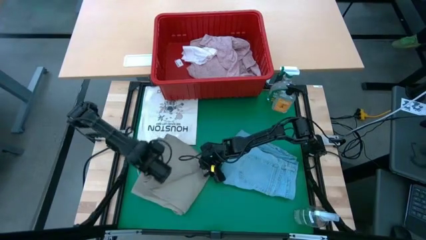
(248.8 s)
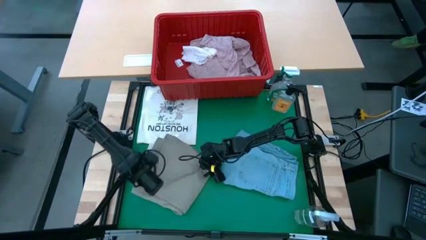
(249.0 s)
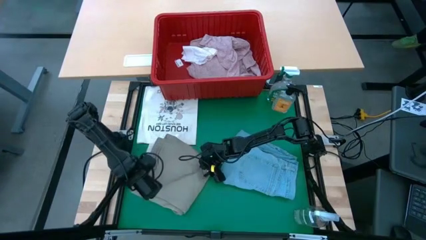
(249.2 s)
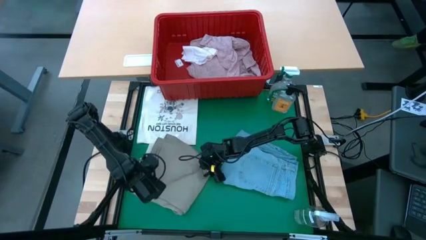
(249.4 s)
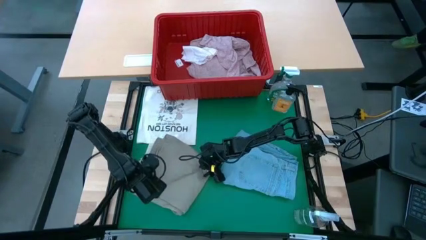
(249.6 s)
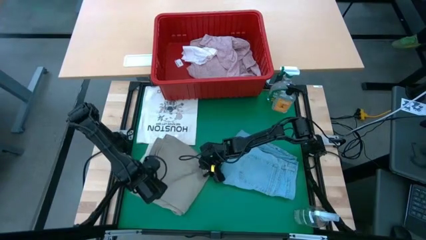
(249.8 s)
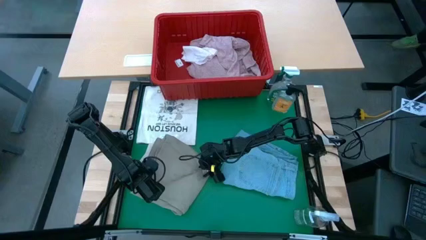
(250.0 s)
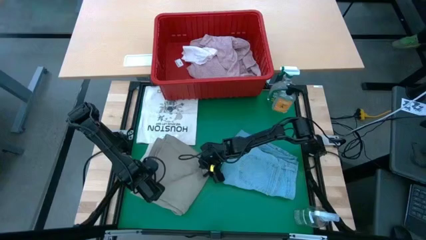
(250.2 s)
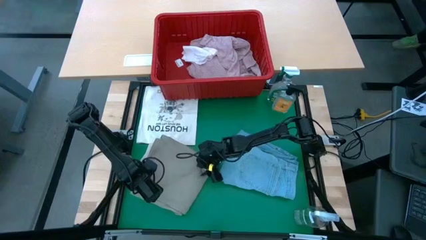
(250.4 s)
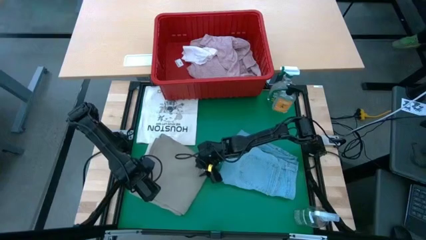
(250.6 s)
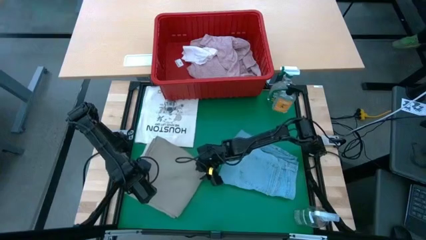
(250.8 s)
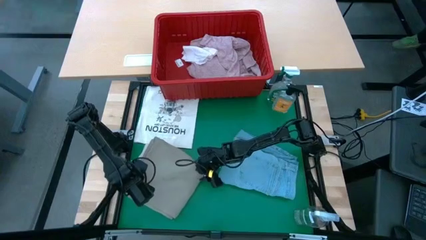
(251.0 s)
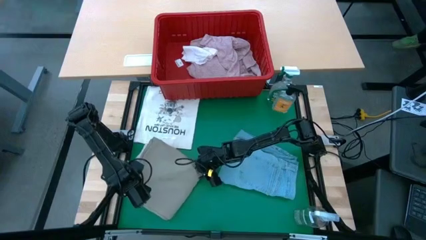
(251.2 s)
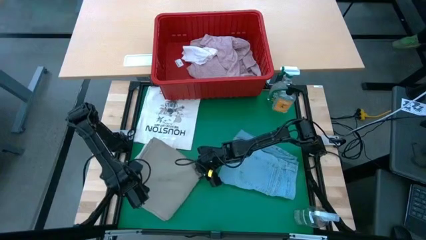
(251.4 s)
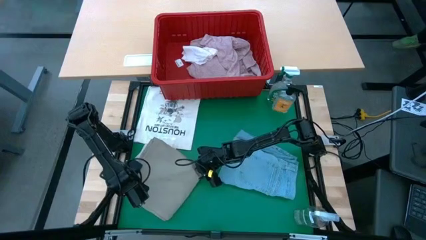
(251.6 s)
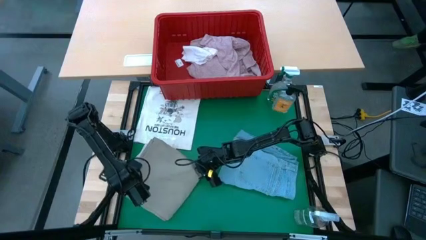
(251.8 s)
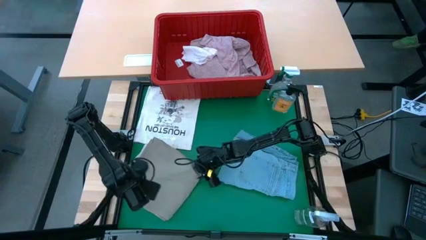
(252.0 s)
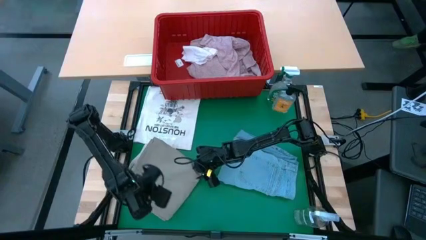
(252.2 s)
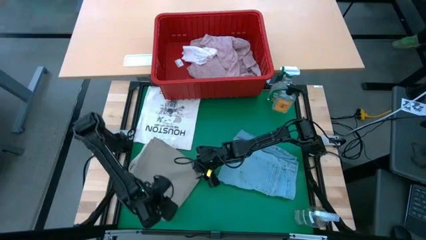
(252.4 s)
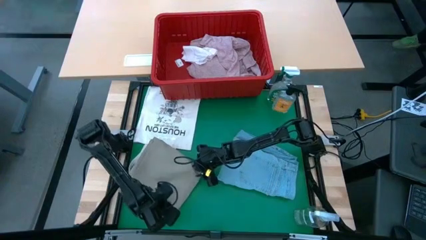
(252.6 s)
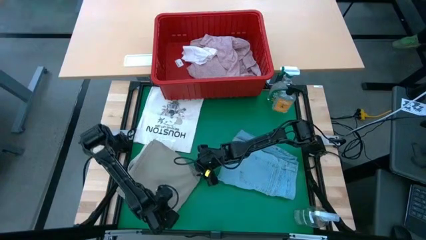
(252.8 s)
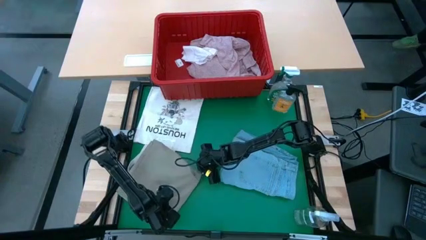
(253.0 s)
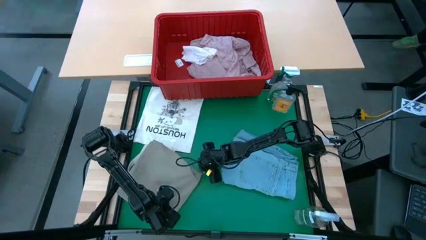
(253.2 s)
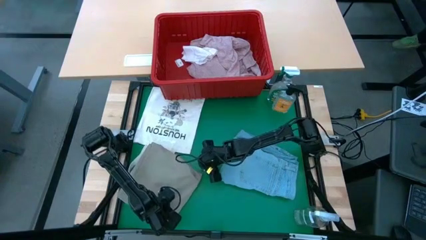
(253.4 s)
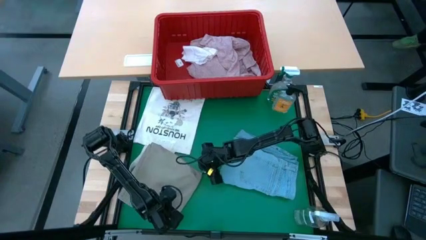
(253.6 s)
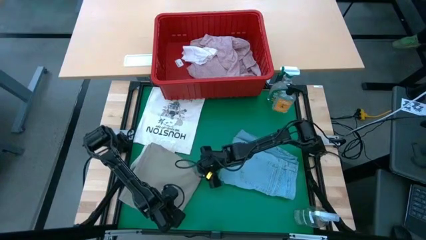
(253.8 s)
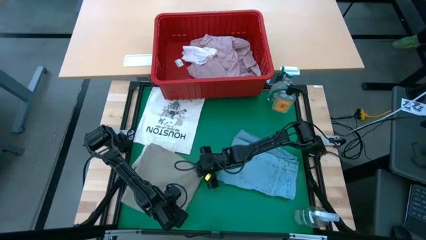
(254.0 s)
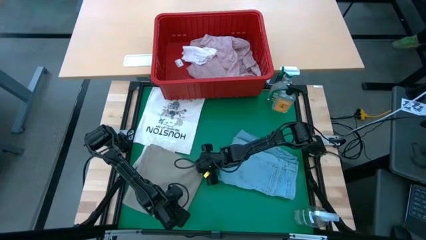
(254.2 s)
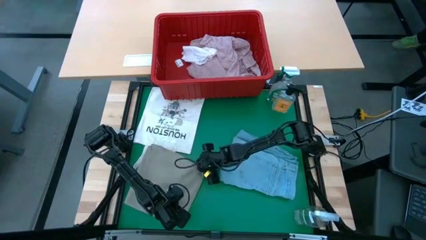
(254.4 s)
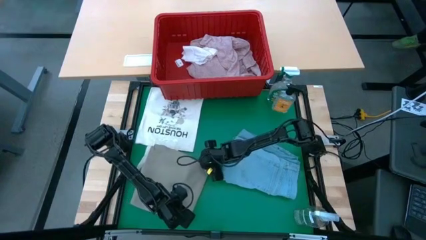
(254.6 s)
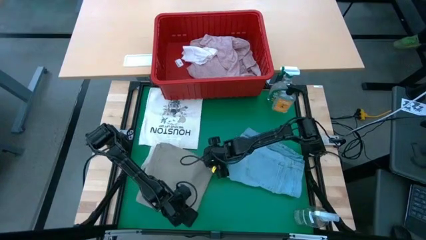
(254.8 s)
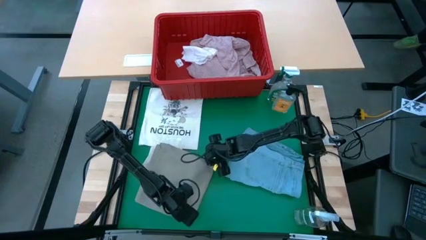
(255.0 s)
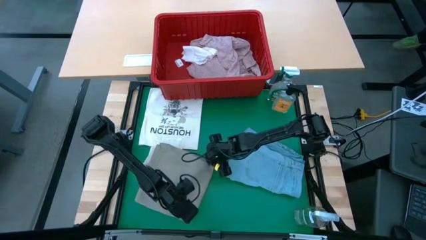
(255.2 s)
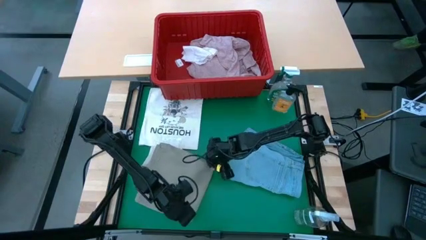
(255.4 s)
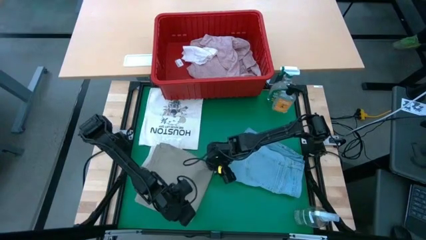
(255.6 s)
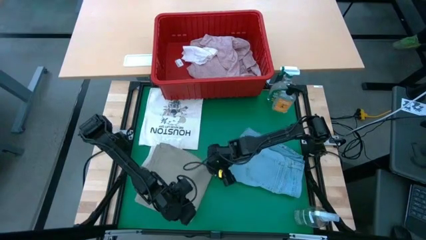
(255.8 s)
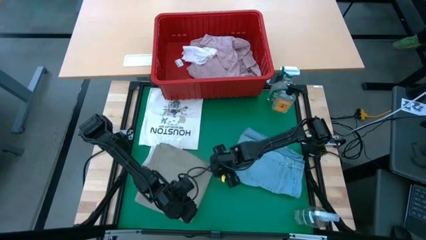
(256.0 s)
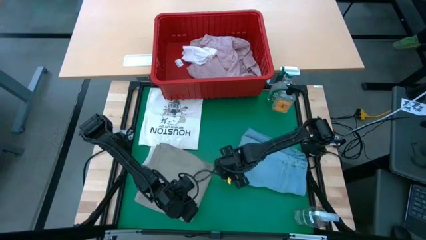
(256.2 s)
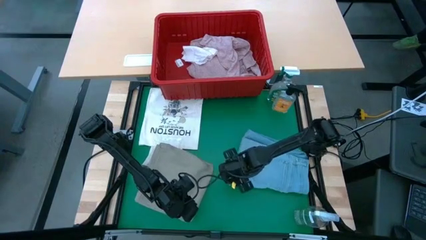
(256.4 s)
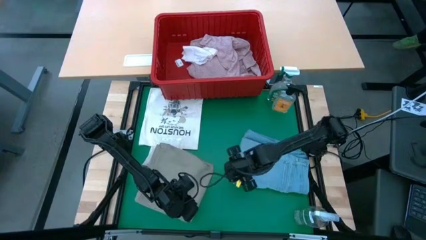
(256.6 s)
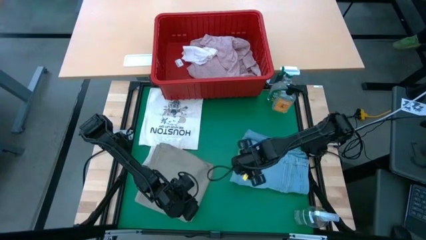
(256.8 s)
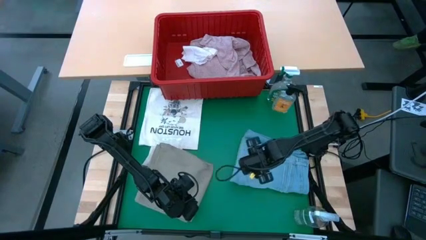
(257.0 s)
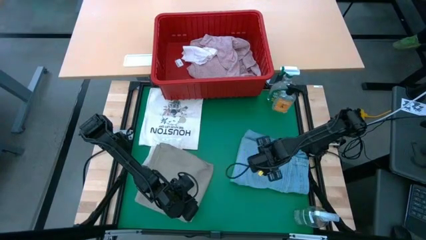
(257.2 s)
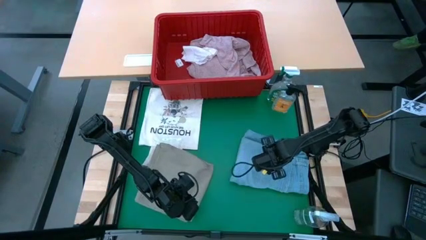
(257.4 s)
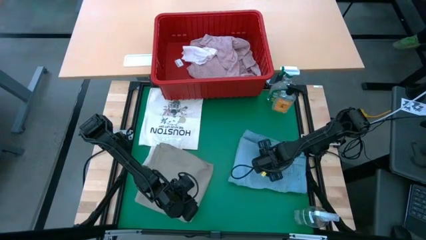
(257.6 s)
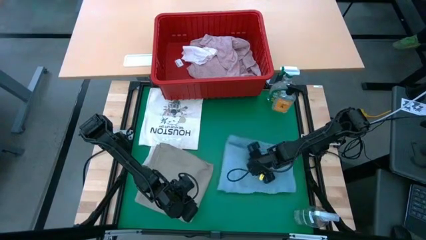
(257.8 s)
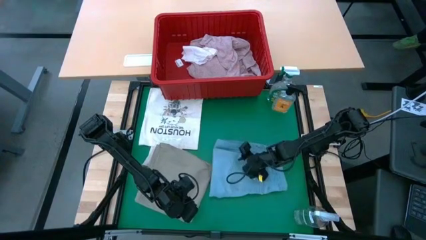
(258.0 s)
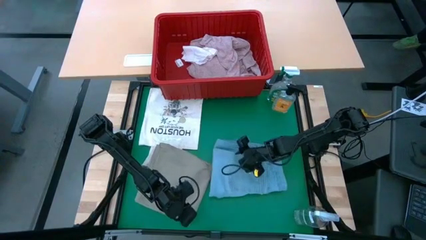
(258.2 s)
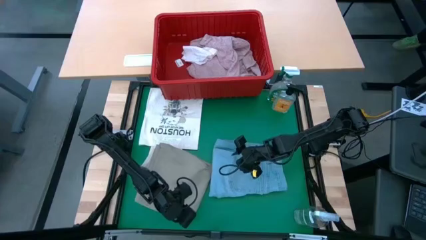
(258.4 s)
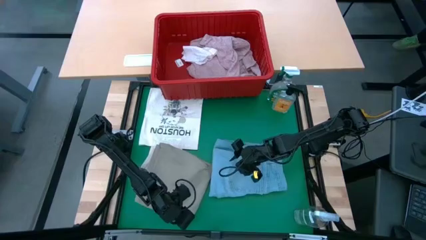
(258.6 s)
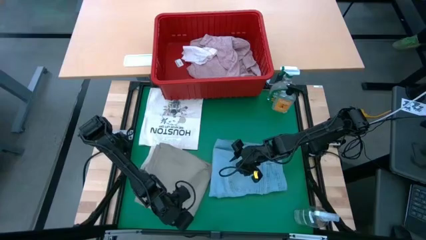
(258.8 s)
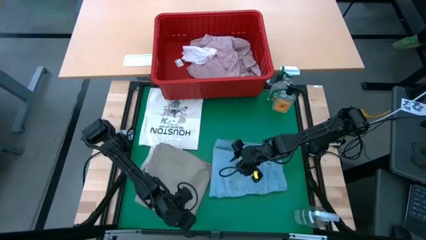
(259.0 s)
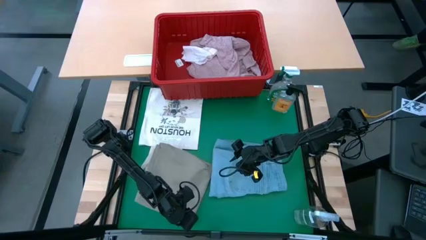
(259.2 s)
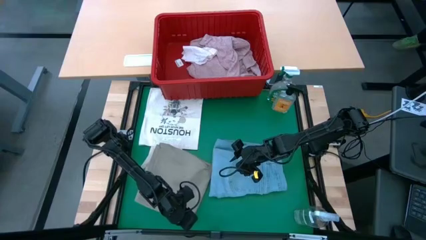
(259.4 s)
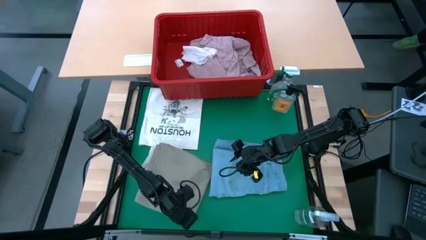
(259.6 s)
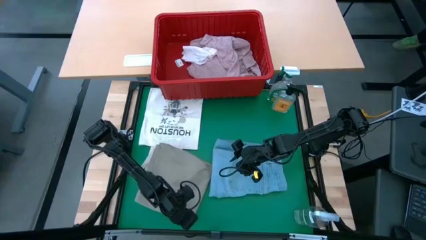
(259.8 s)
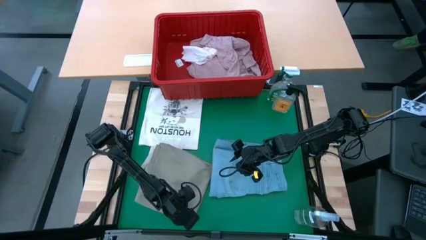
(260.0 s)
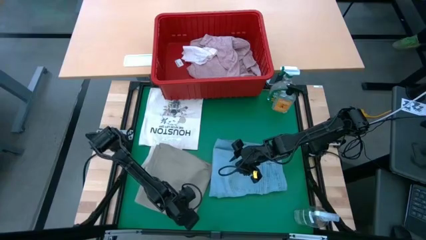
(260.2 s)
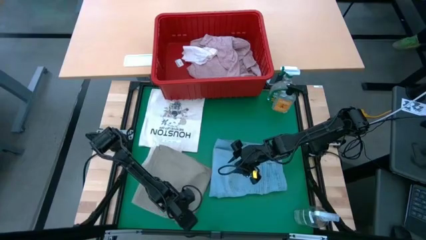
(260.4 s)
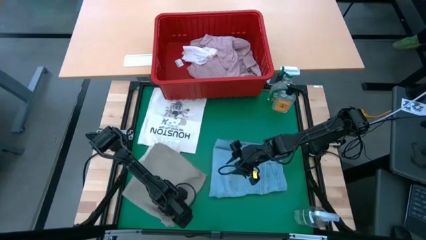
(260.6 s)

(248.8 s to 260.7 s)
Task: Fold laundry
Fold the gray short
